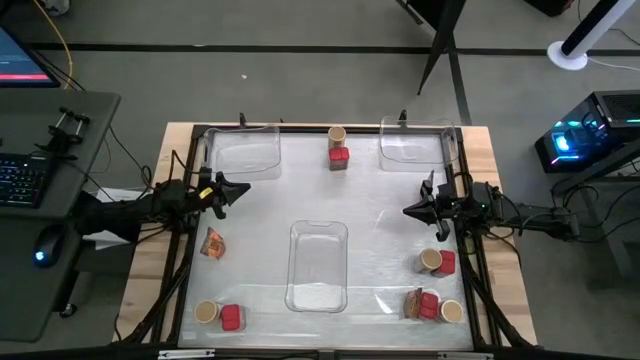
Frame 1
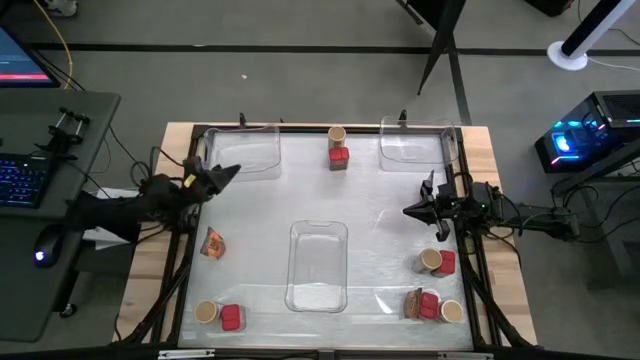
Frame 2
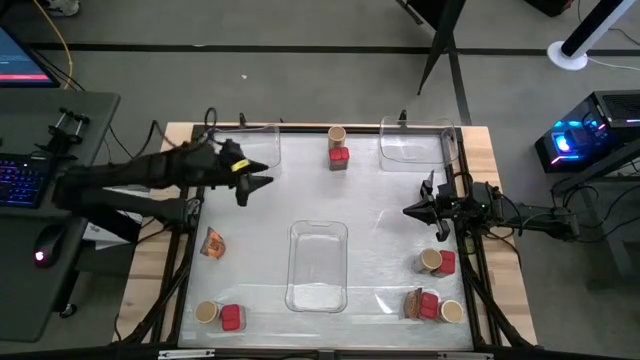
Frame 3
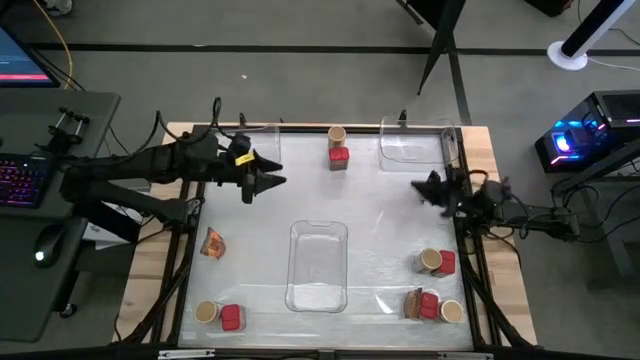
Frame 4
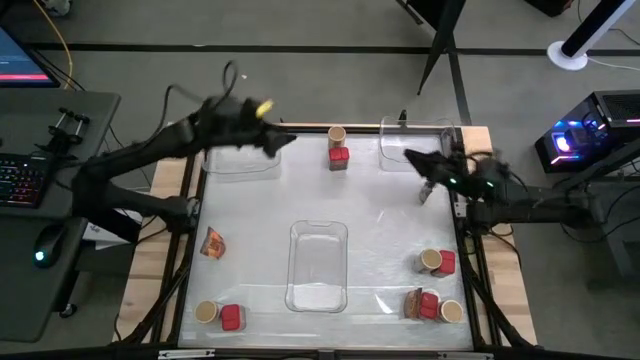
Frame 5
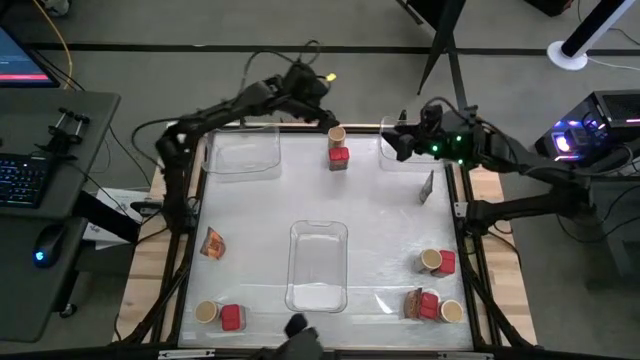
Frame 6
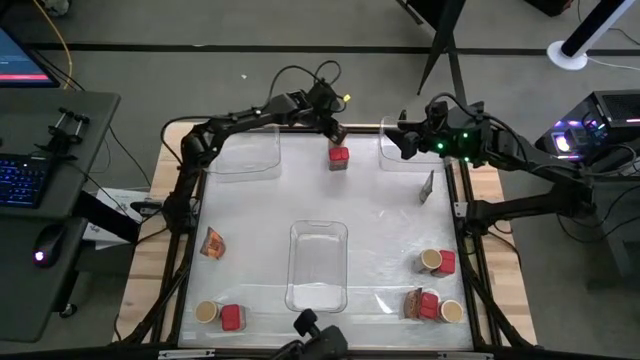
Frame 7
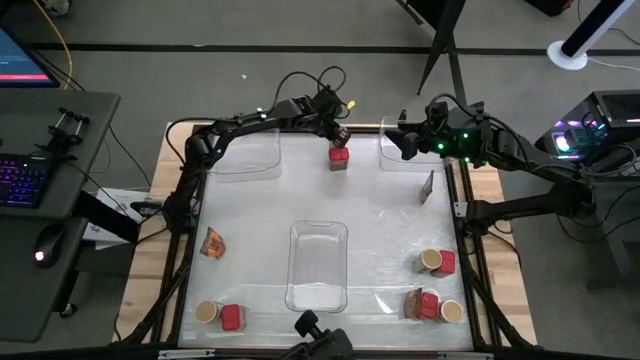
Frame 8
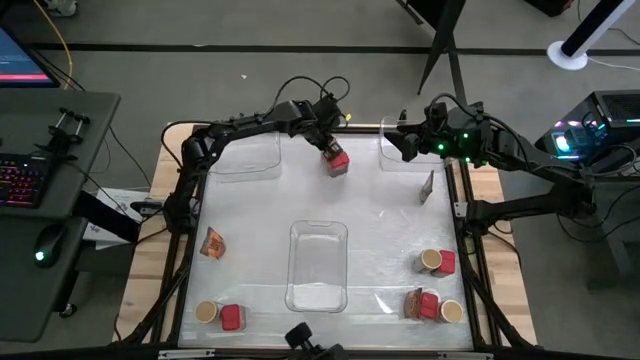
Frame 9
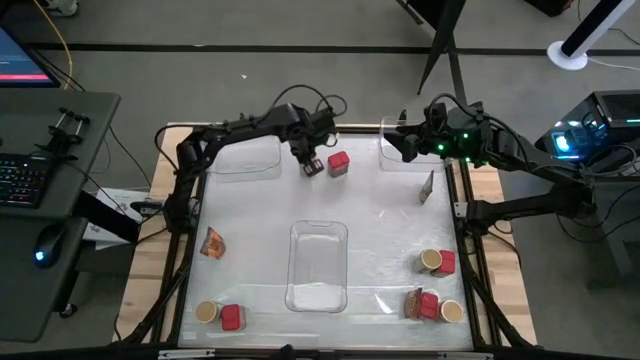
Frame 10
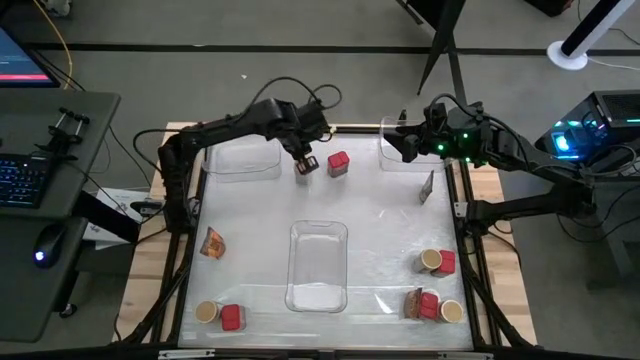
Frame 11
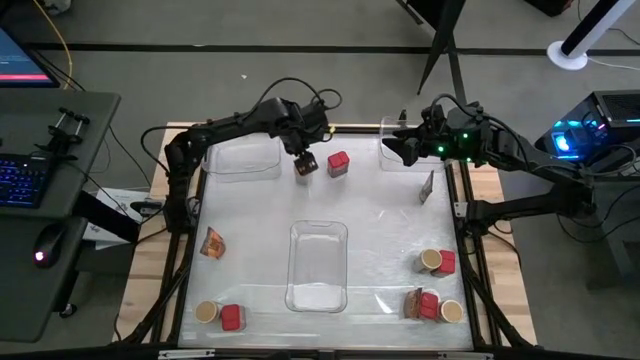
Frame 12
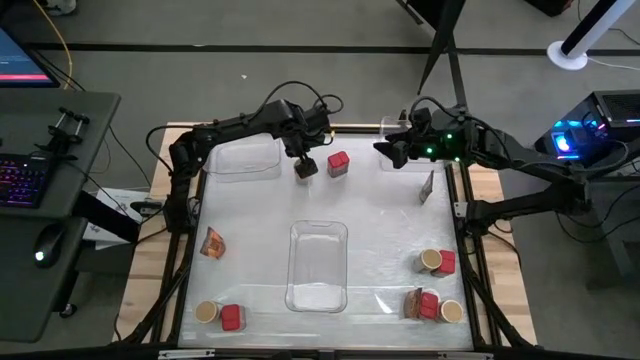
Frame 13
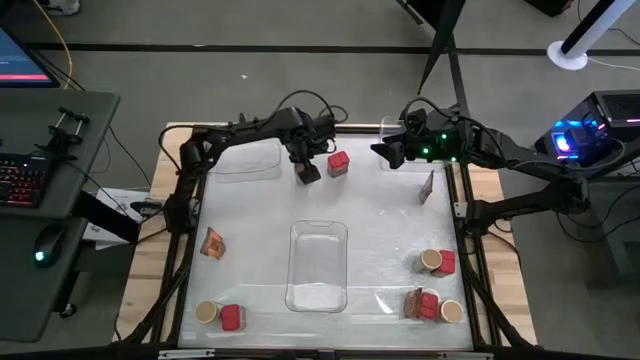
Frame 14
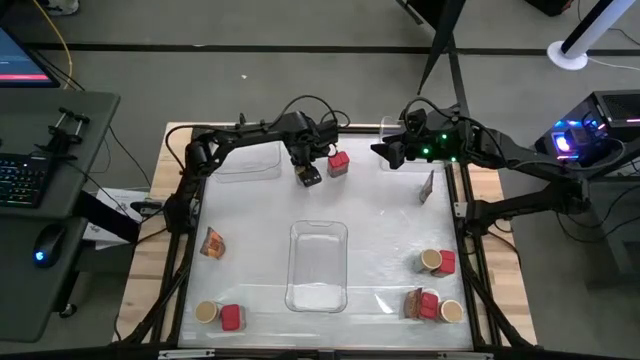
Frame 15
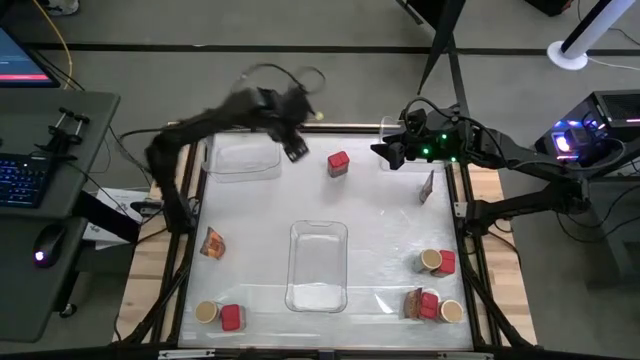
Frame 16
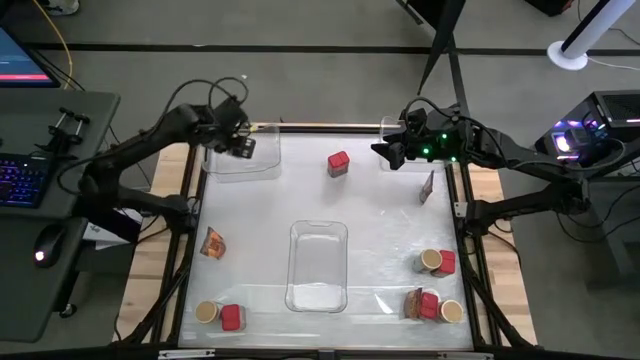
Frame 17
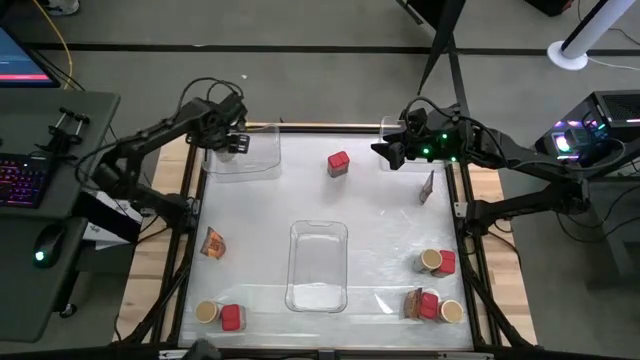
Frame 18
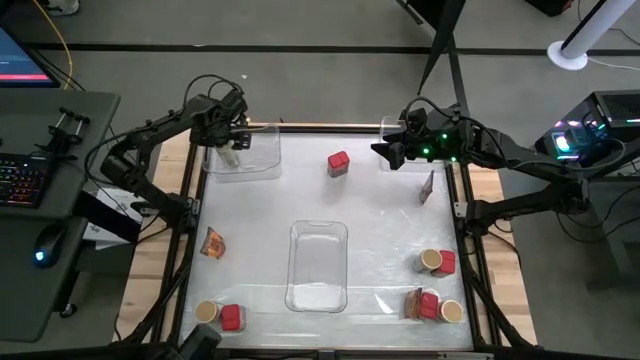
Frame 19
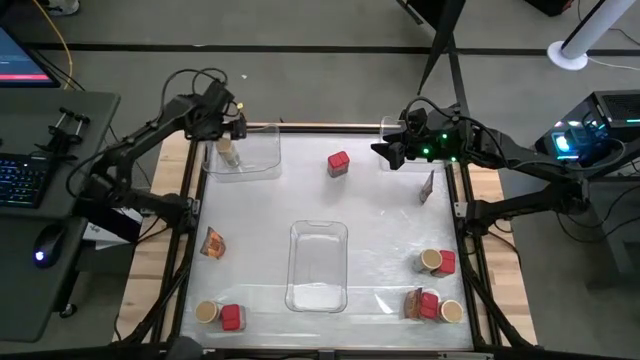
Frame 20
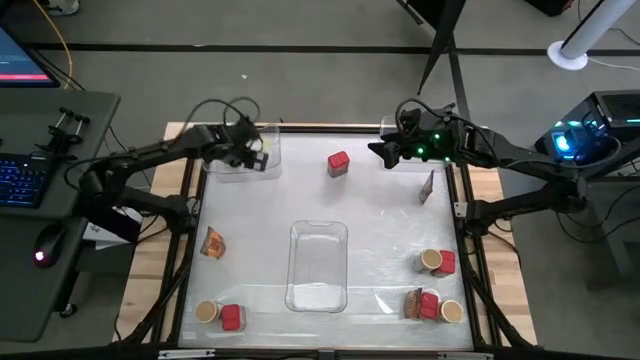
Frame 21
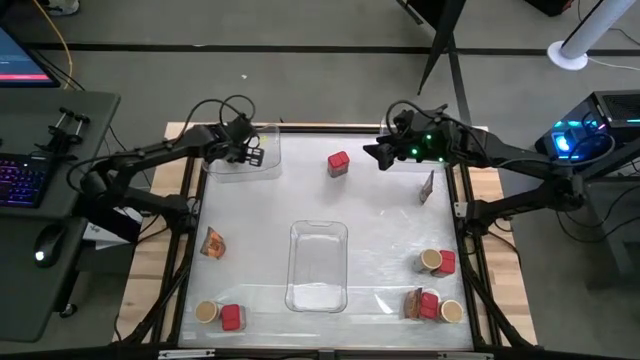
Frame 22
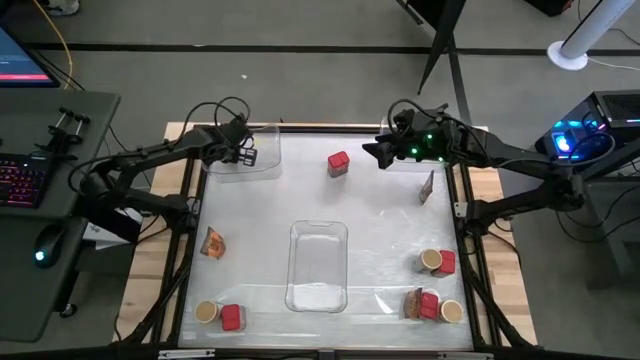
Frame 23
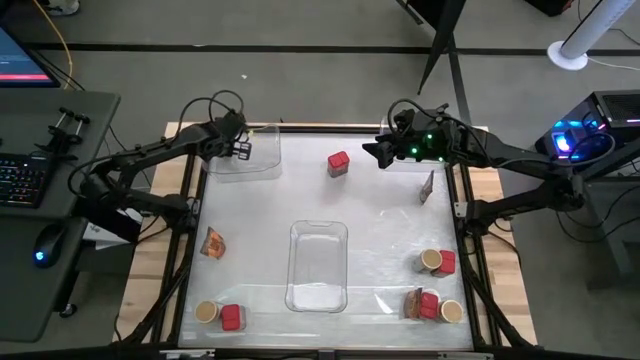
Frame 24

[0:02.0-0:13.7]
Task: Sort spices by type
Put the top gold seasoning bottle into the top left transparent bin

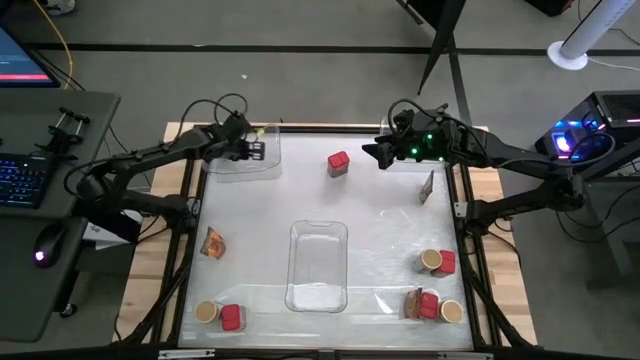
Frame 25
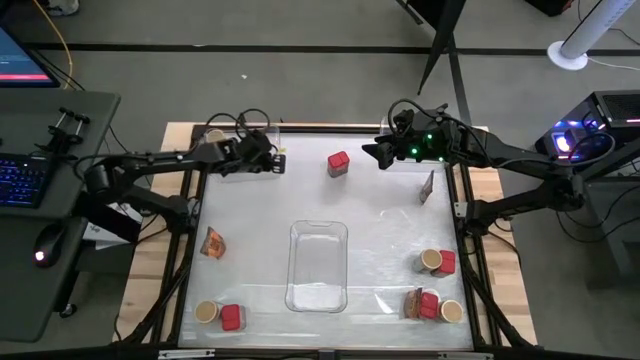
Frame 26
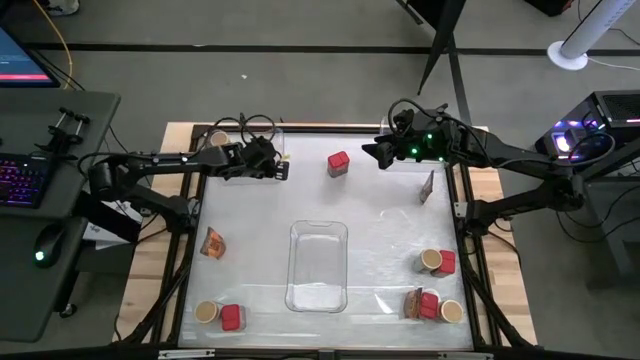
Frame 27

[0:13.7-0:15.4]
Adjust the top left transparent bin

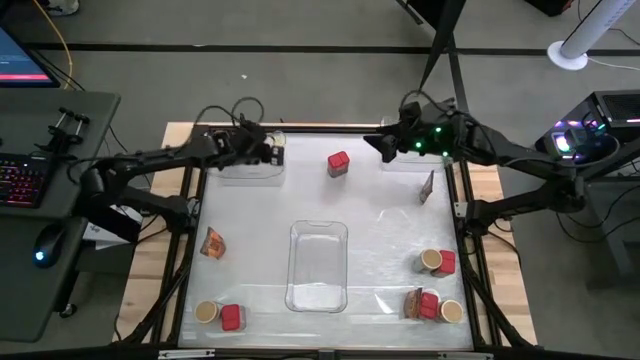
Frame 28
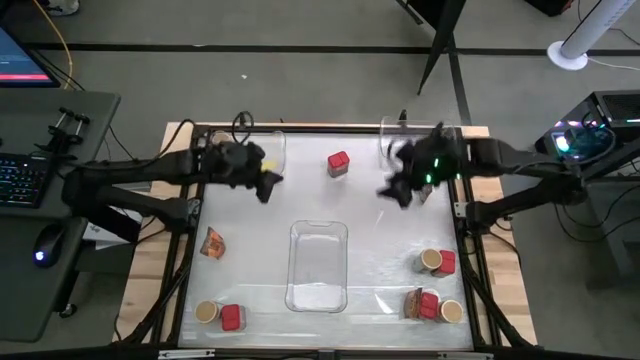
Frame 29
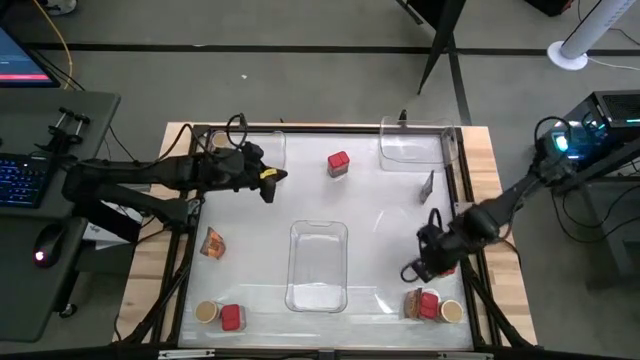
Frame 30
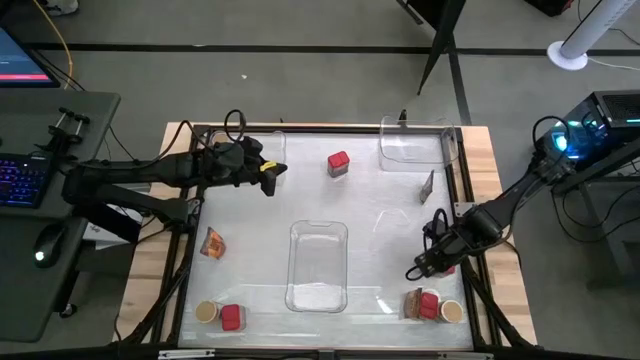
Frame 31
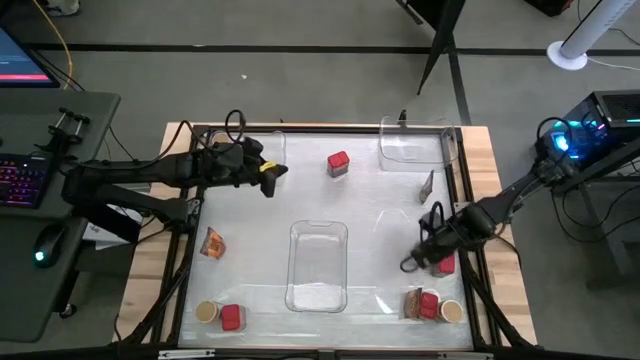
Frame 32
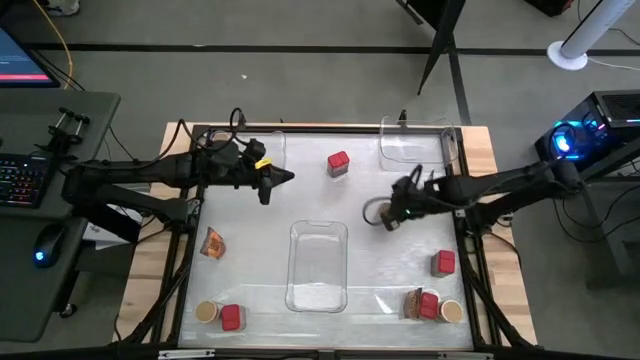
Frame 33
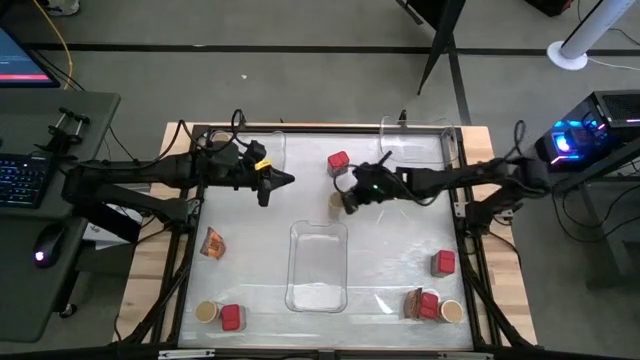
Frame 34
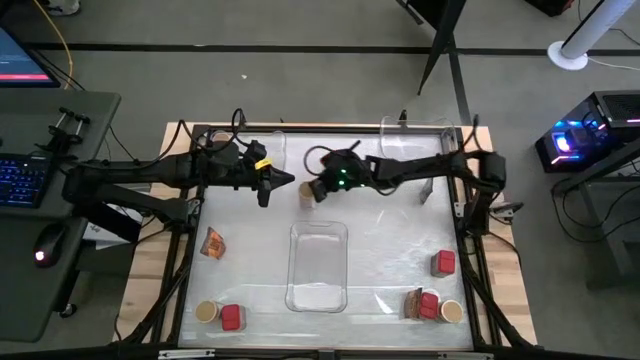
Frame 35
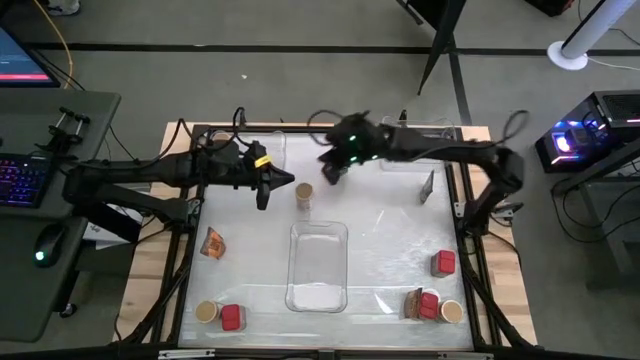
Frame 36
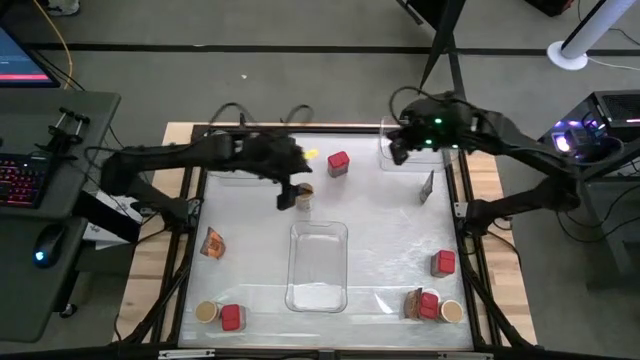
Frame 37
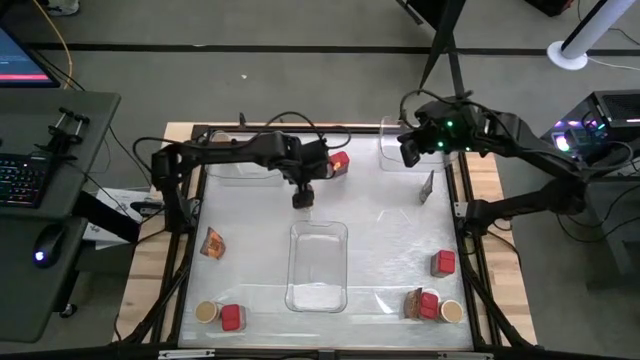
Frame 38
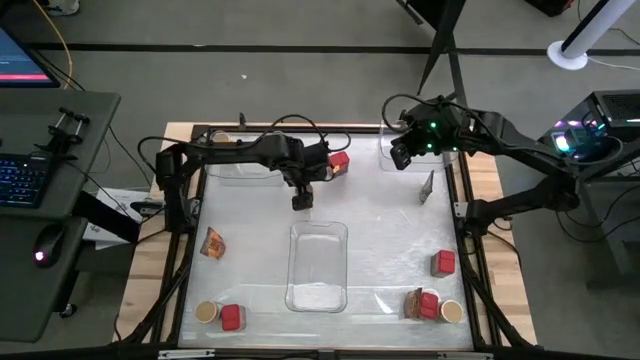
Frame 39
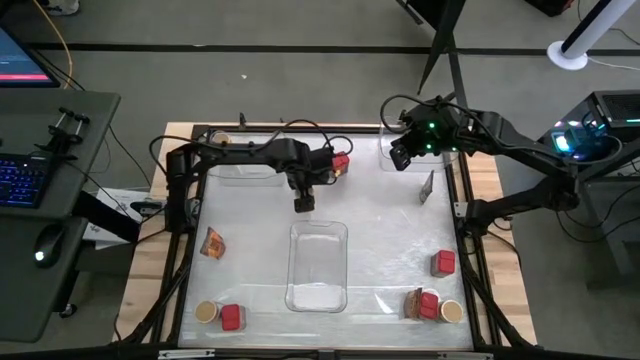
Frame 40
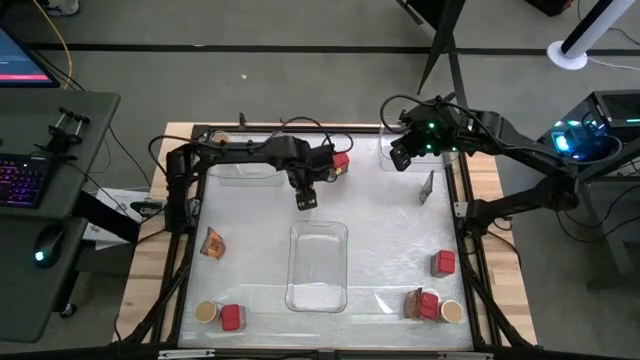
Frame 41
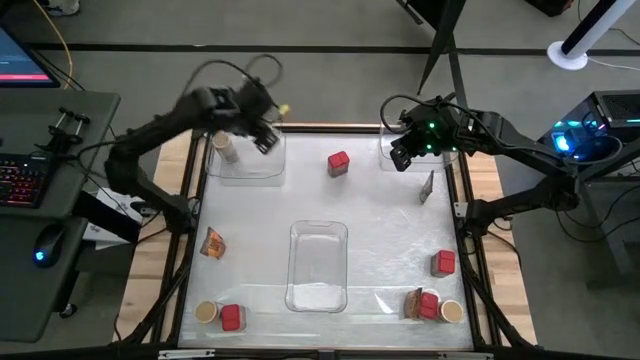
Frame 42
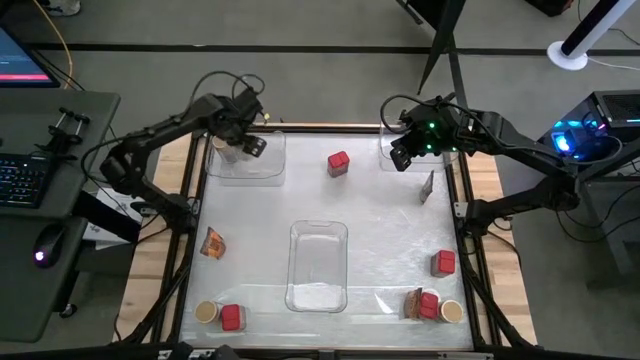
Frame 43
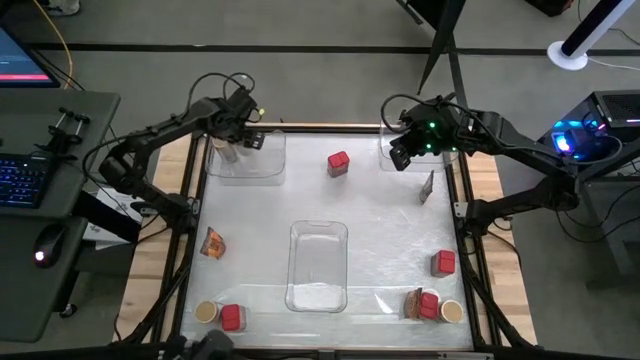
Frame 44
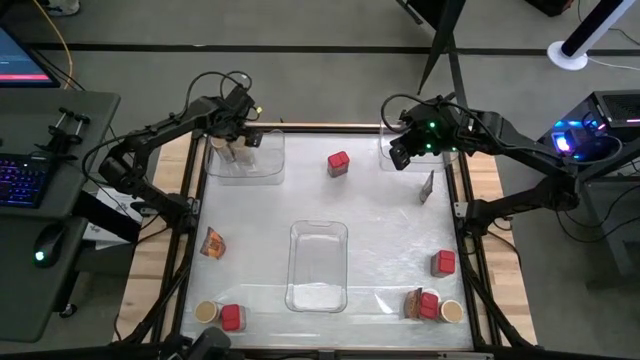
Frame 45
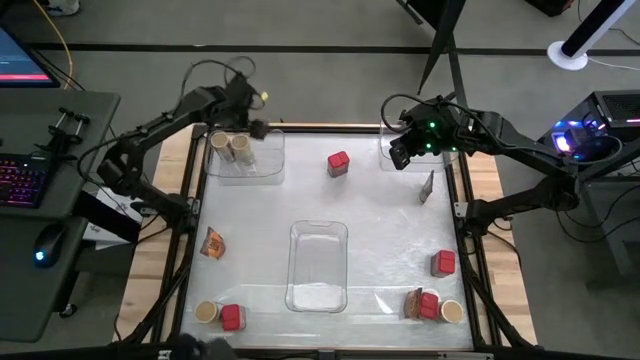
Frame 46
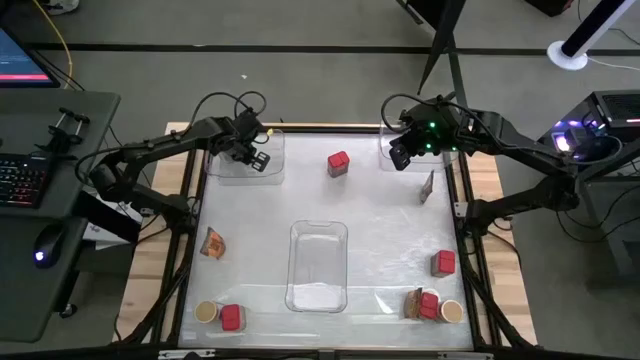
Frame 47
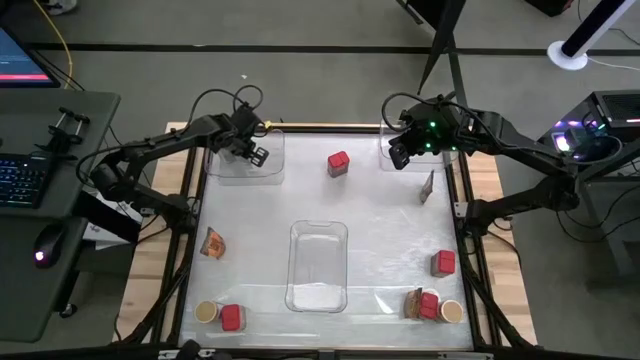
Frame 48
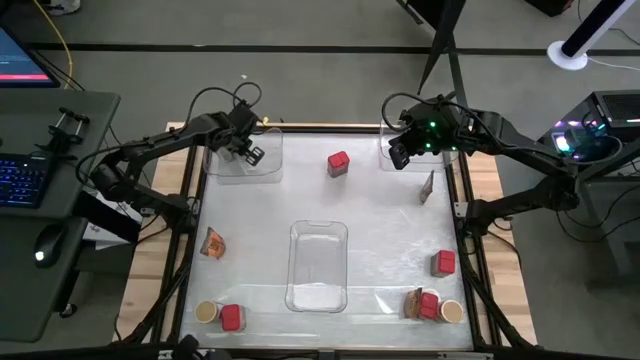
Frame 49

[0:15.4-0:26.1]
Put the top gold seasoning bottle into the top left transparent bin
